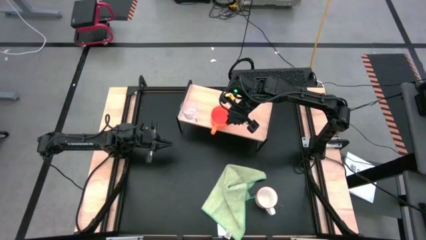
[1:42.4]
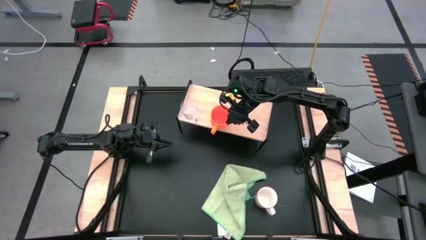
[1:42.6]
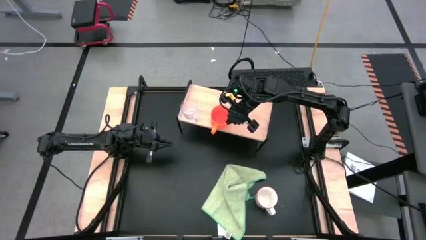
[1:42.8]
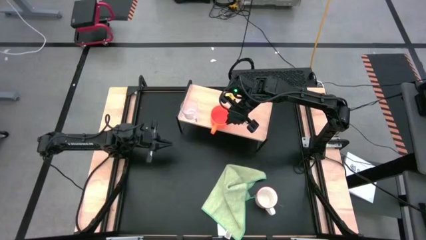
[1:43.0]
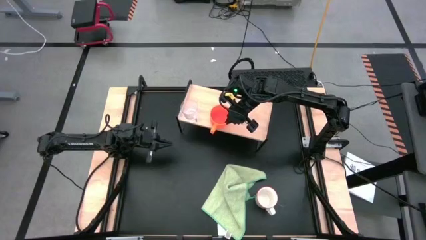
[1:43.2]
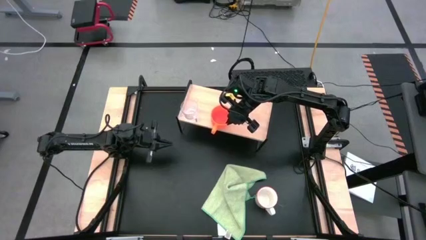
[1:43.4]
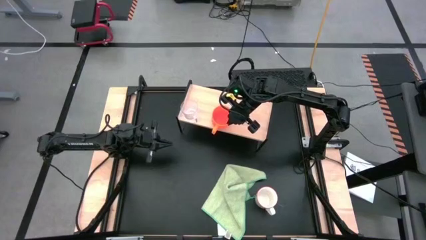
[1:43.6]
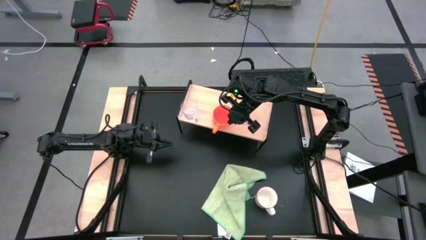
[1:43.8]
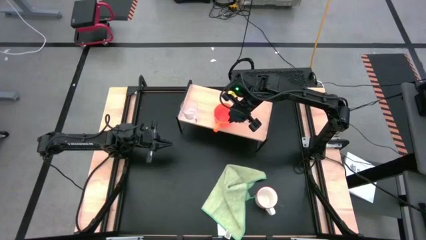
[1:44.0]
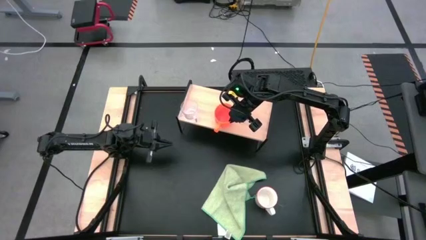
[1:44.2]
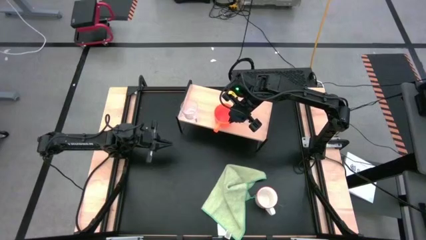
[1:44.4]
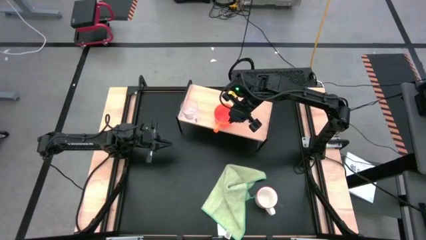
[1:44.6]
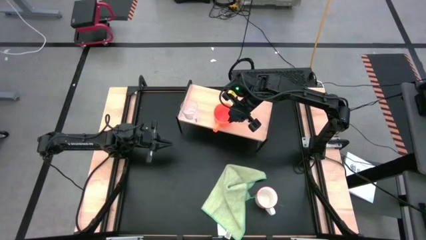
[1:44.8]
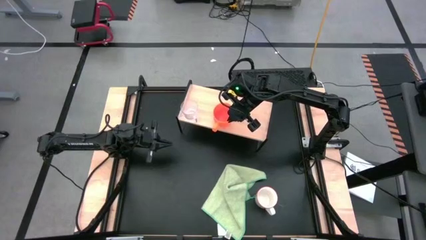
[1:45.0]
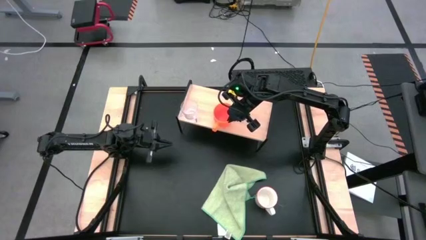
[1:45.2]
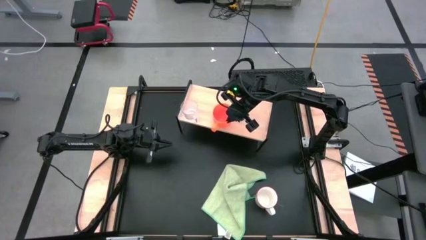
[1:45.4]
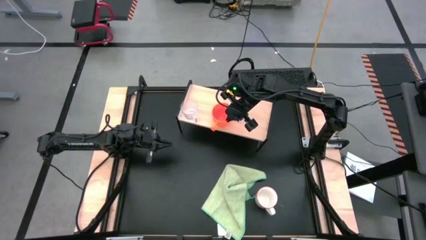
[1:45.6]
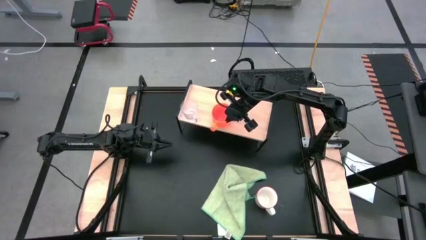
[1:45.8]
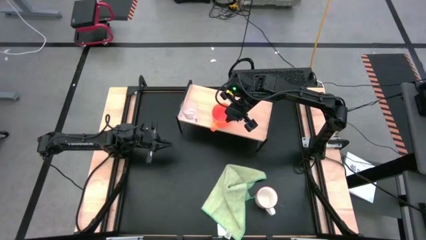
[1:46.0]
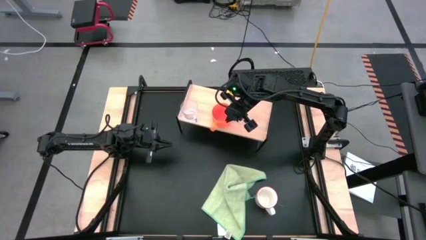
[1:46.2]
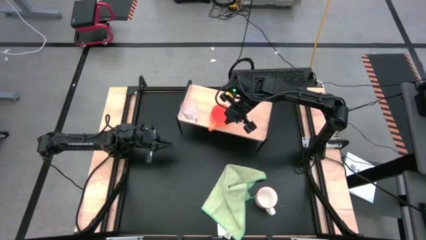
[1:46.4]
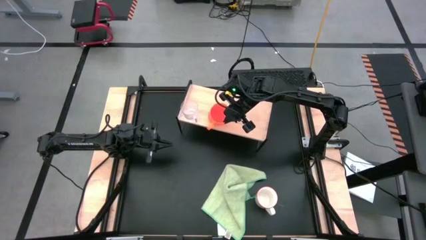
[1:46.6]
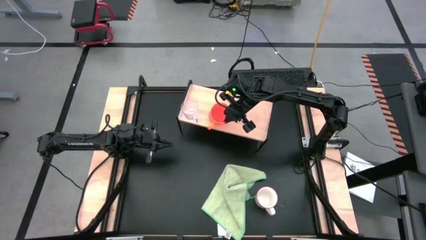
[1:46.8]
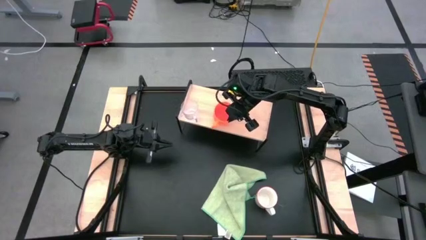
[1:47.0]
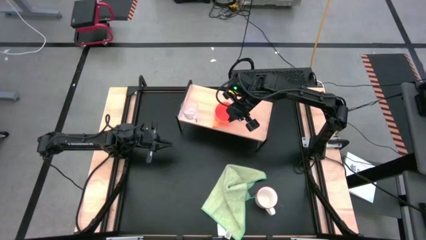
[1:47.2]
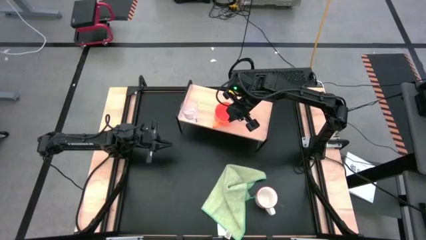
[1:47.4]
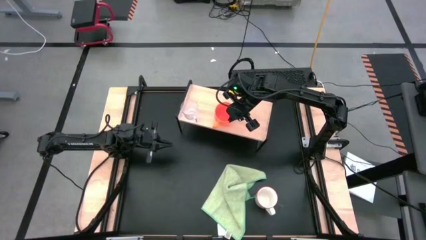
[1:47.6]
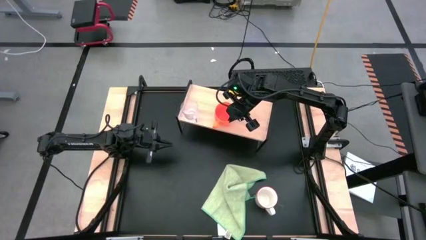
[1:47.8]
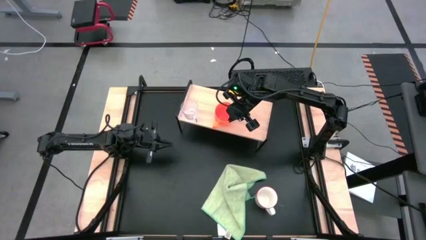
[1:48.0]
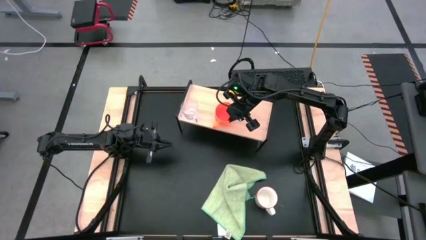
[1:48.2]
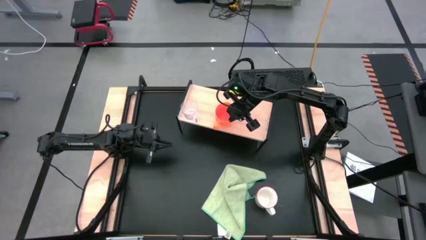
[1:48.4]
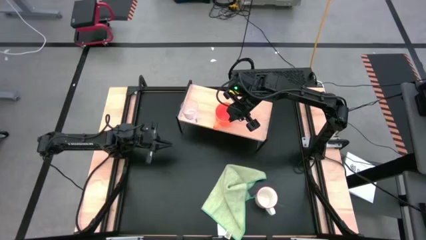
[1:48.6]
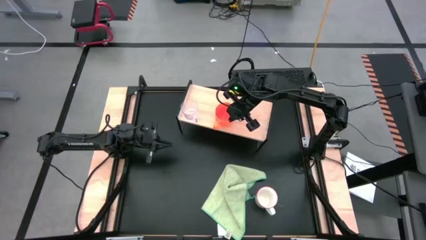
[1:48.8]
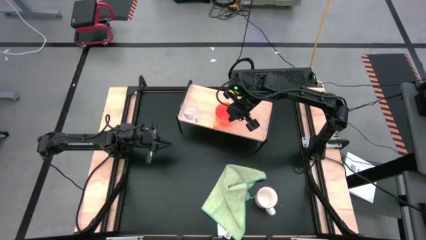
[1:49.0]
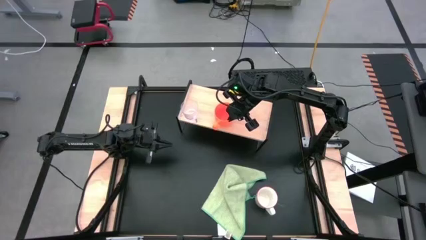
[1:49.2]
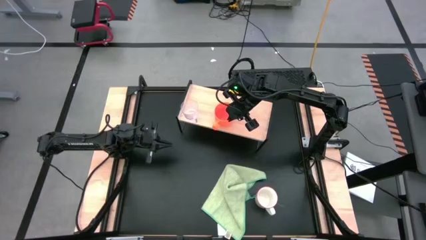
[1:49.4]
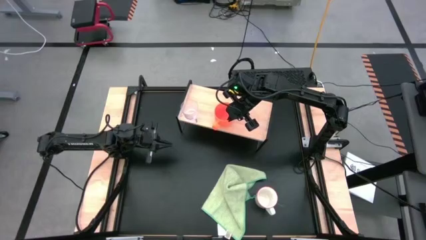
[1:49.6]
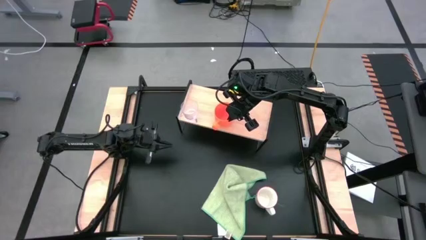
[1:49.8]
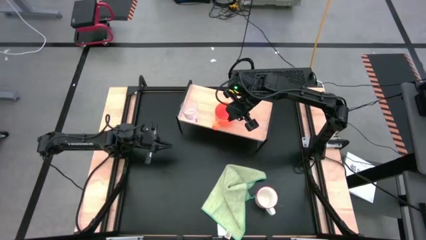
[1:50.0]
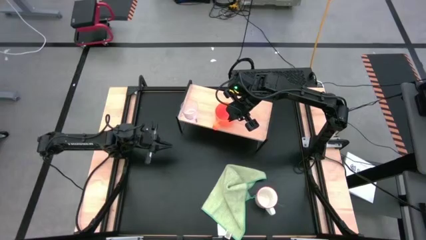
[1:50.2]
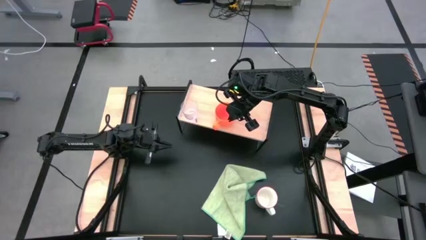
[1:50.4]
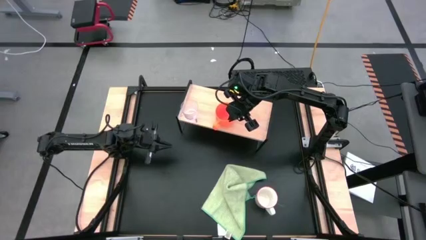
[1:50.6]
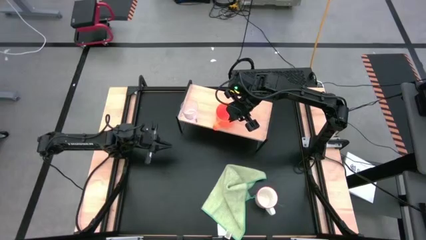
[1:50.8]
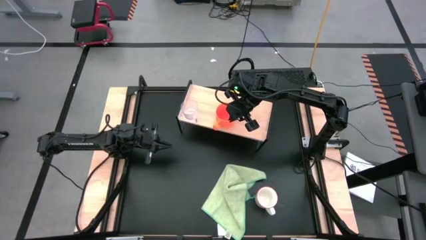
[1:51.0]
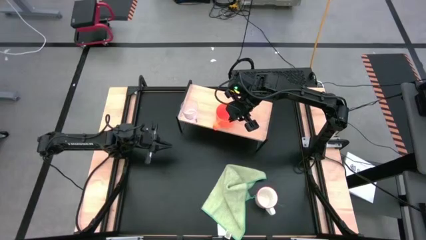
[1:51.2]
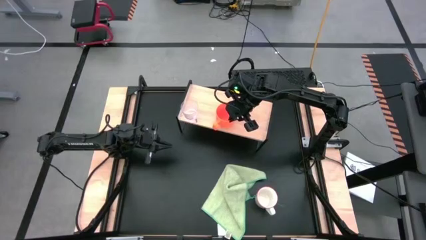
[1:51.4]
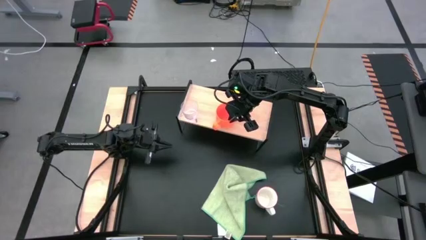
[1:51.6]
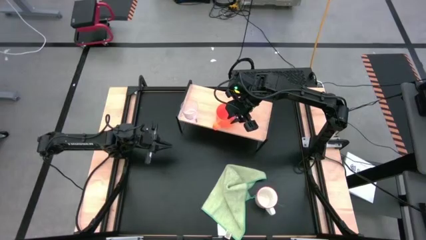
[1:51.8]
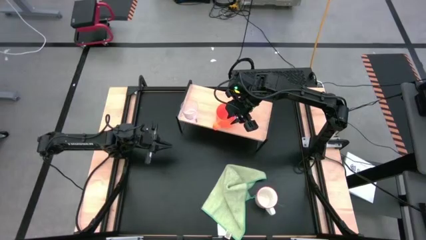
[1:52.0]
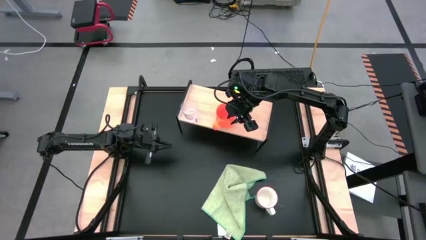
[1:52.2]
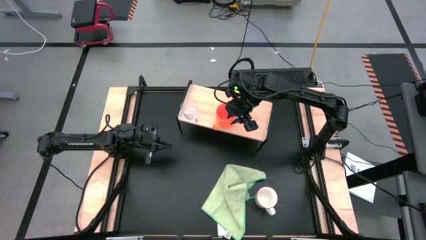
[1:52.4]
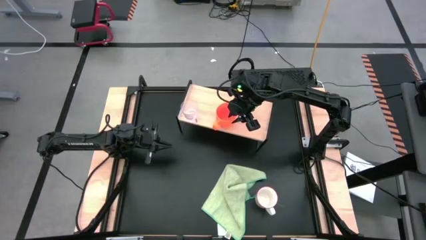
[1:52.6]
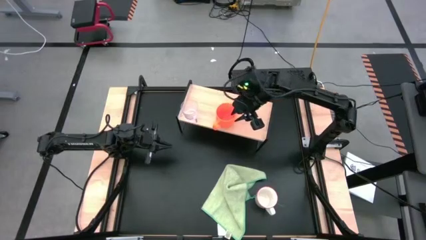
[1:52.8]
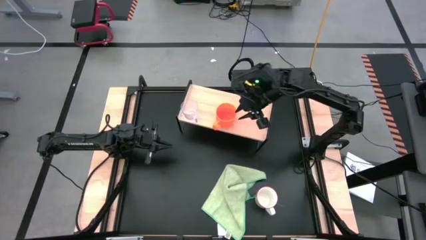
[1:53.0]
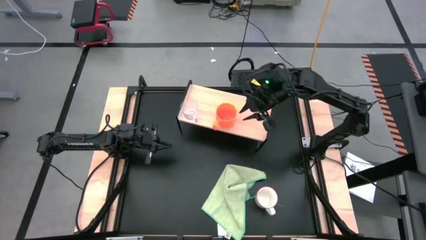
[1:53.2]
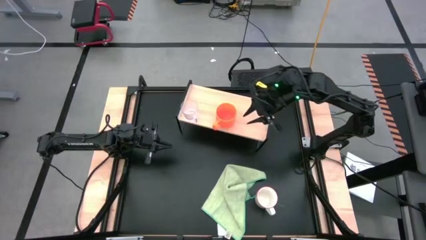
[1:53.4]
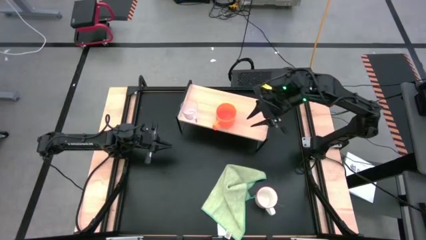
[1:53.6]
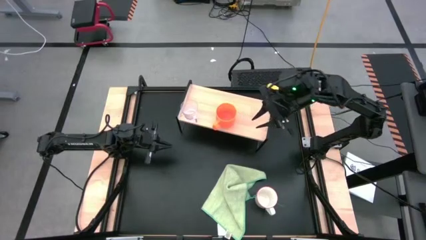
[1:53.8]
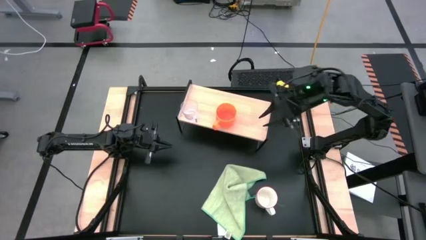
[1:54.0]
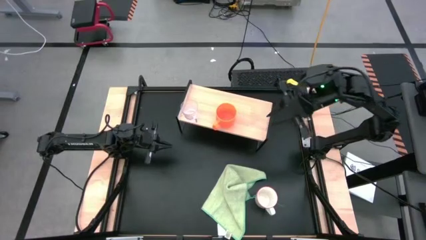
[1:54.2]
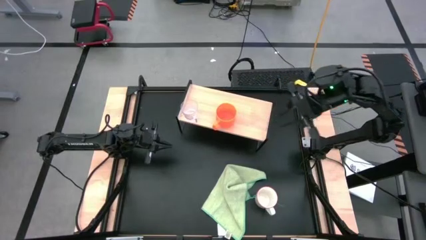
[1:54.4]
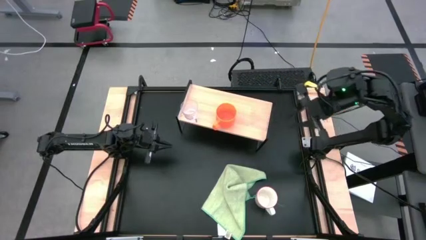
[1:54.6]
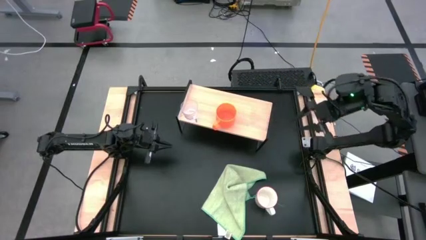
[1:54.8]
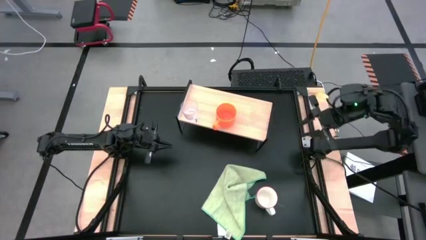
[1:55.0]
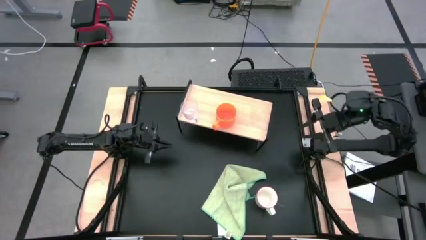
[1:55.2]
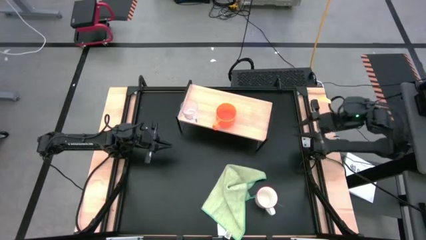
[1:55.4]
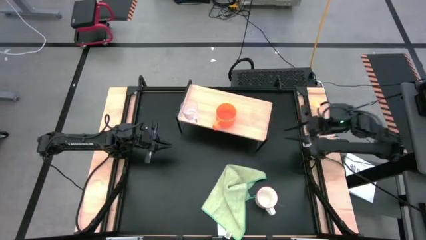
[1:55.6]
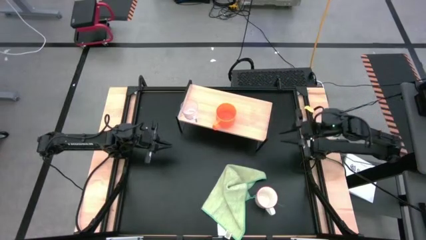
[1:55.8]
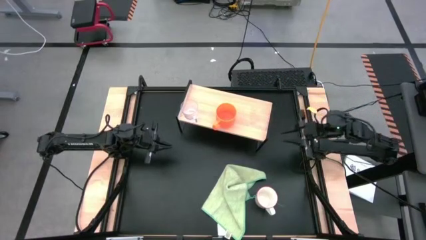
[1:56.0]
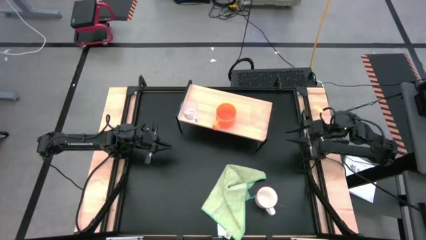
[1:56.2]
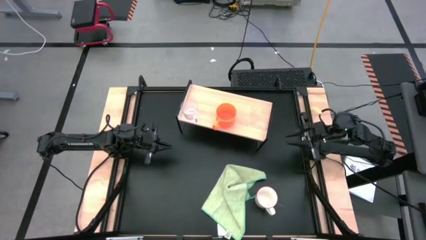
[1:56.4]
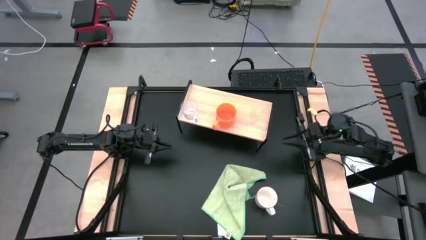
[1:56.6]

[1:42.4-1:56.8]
Task: Stack small to large cups/mugs on shelf
Adjust the orange mug to the middle bottom part of the shelf

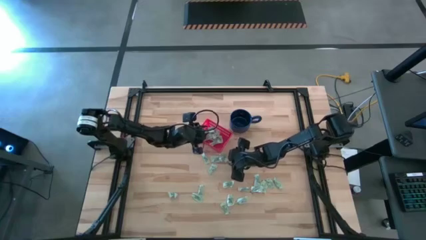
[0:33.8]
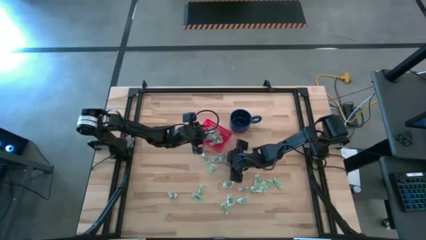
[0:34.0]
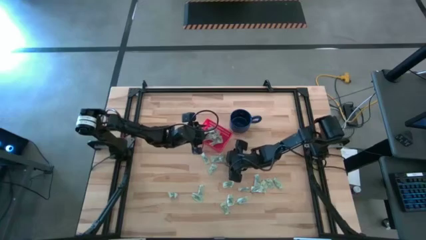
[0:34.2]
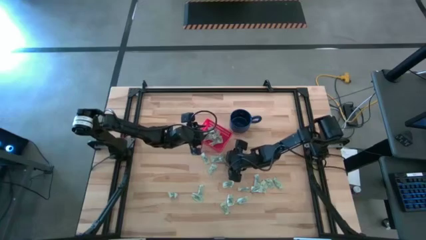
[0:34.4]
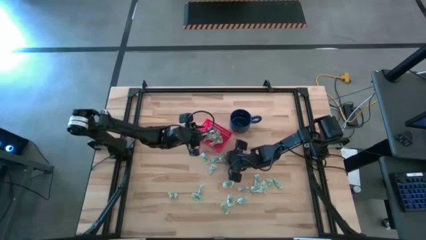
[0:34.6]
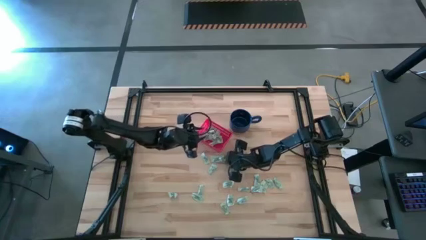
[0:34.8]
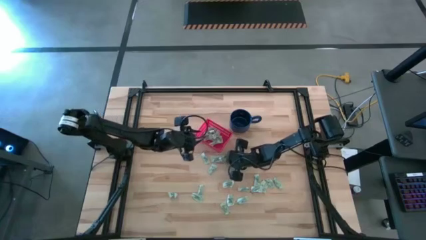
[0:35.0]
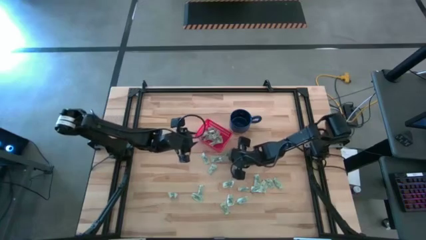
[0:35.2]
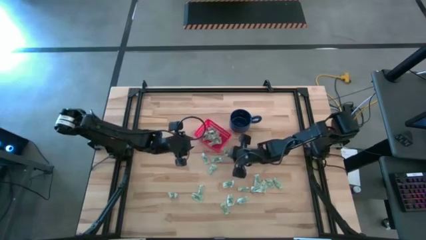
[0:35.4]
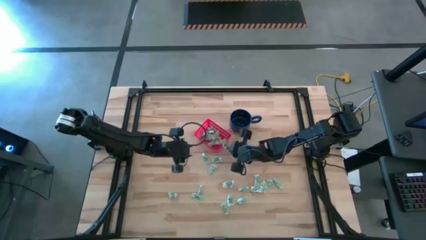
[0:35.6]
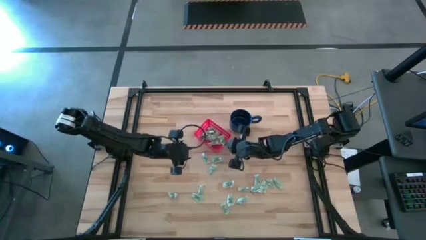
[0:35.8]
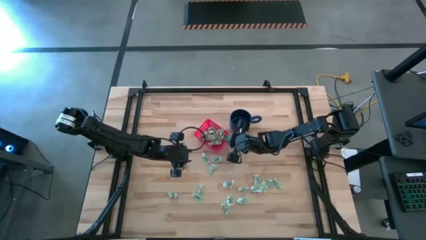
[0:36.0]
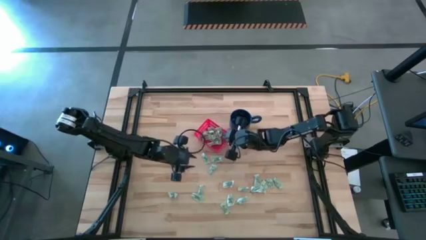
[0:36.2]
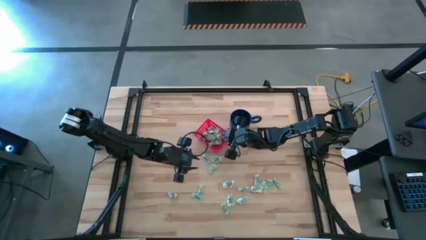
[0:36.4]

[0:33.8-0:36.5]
Task: Pick and place items into bin
Put the stevia packet into the bin
